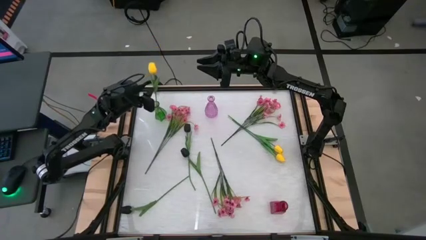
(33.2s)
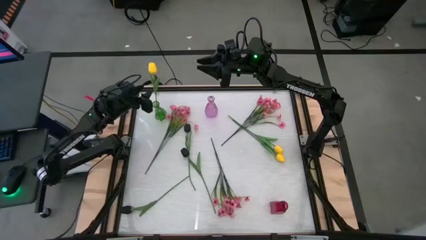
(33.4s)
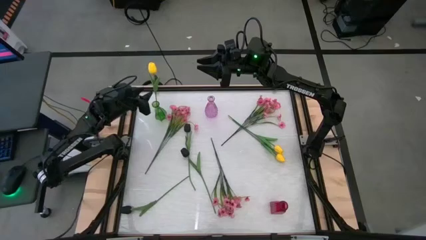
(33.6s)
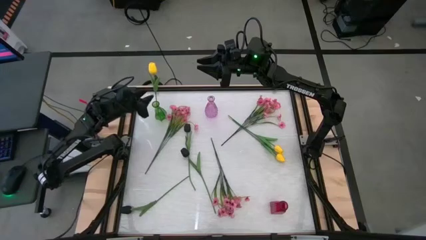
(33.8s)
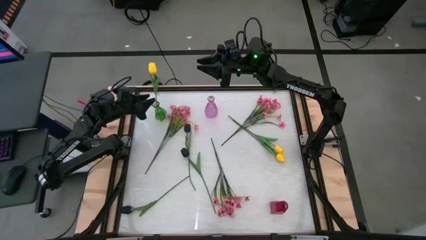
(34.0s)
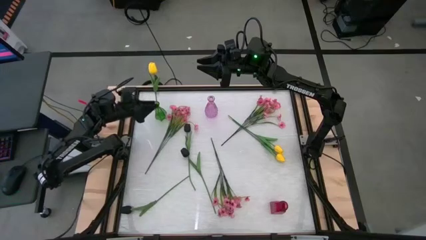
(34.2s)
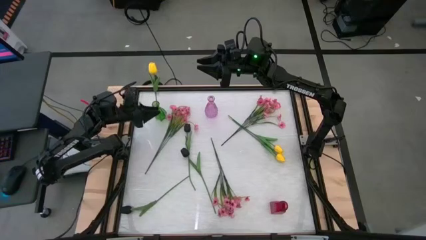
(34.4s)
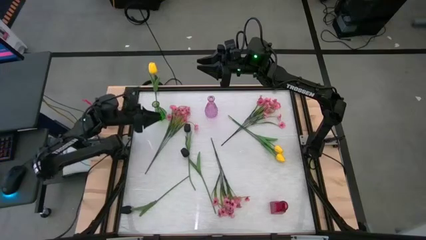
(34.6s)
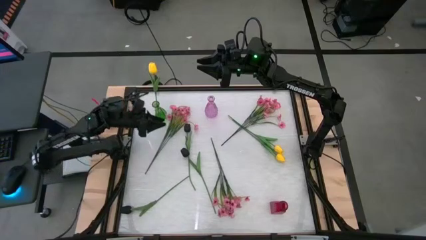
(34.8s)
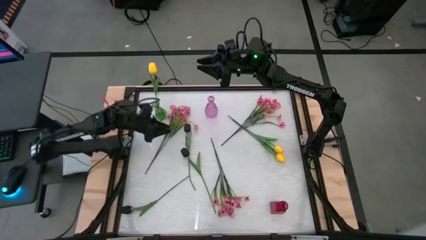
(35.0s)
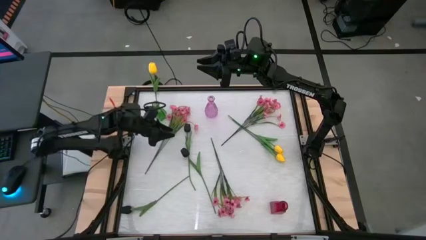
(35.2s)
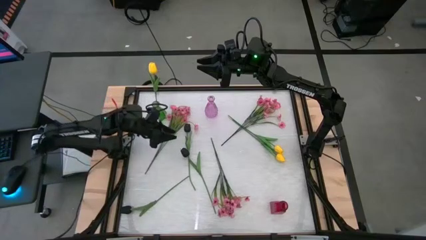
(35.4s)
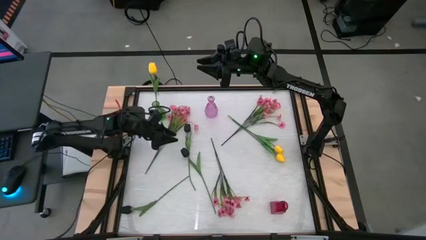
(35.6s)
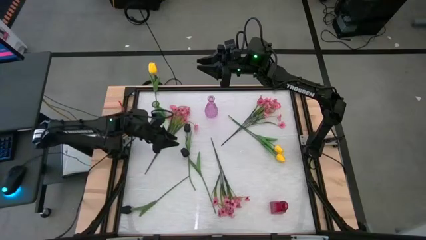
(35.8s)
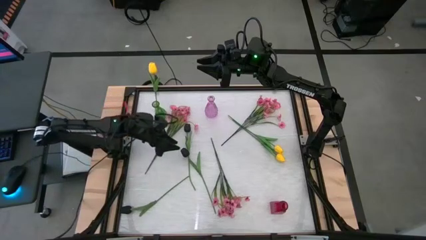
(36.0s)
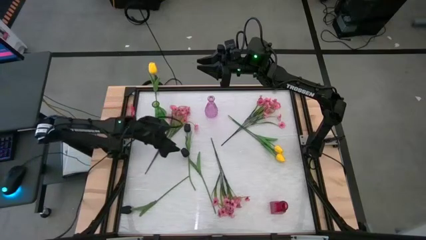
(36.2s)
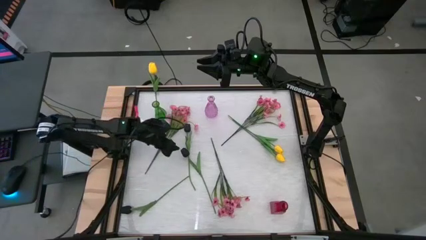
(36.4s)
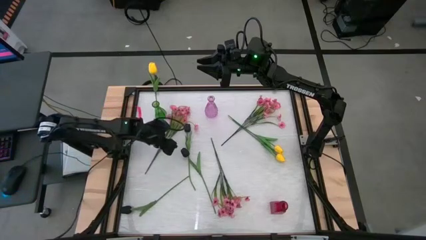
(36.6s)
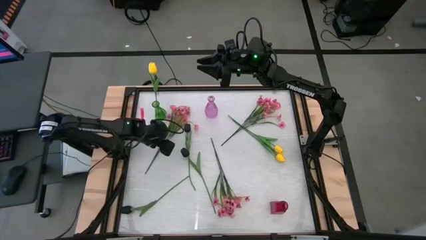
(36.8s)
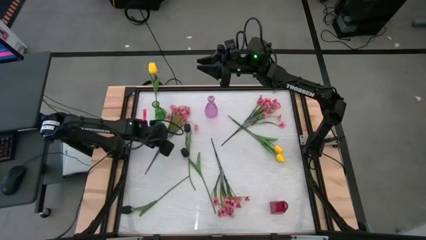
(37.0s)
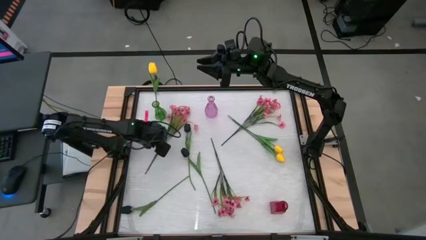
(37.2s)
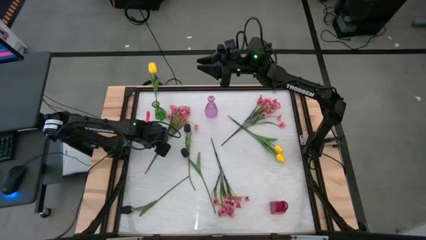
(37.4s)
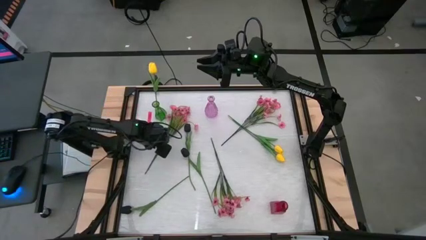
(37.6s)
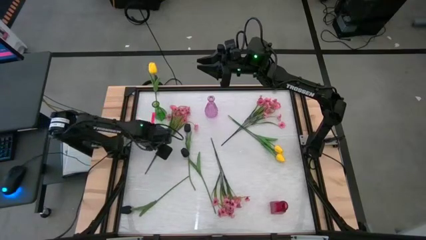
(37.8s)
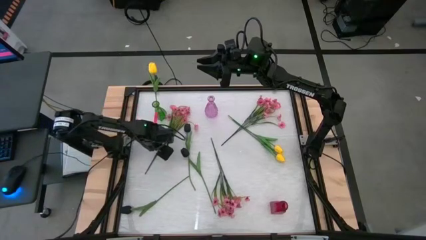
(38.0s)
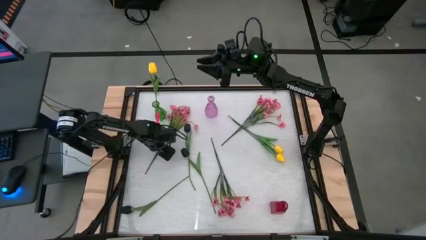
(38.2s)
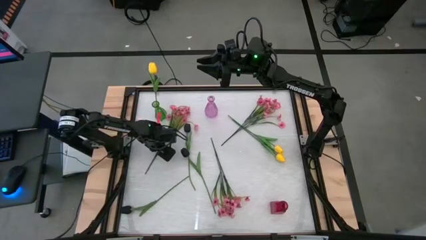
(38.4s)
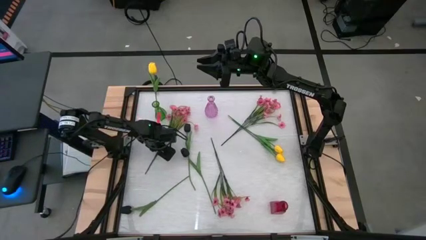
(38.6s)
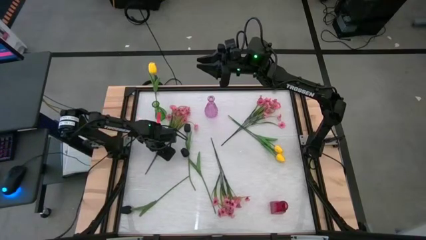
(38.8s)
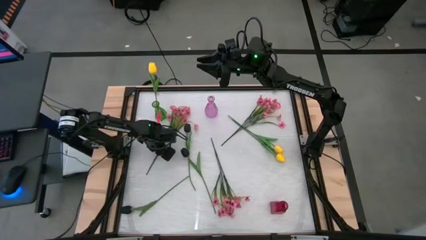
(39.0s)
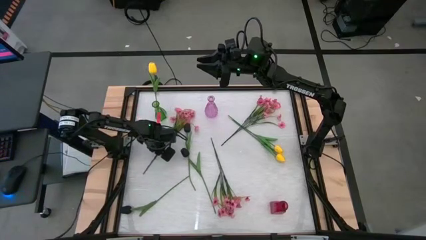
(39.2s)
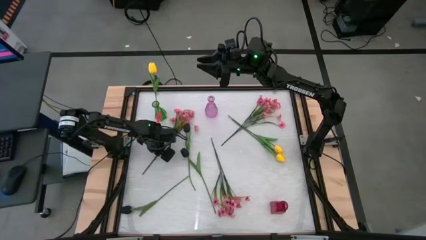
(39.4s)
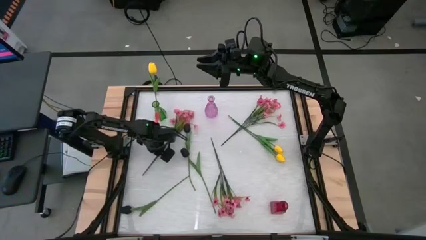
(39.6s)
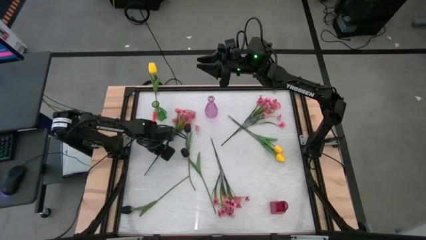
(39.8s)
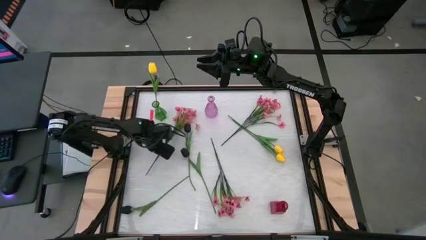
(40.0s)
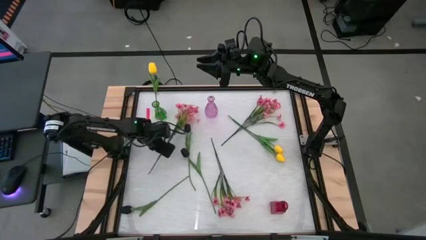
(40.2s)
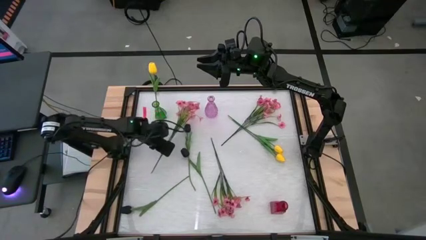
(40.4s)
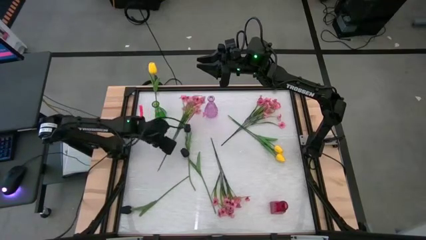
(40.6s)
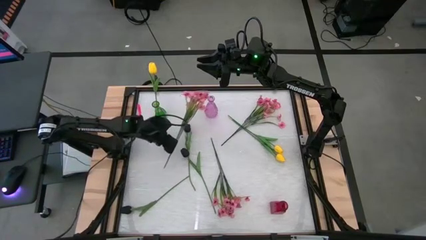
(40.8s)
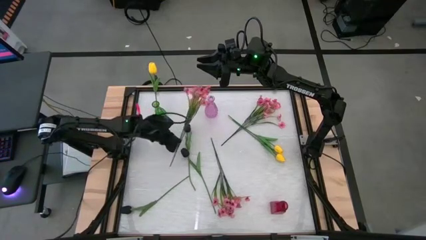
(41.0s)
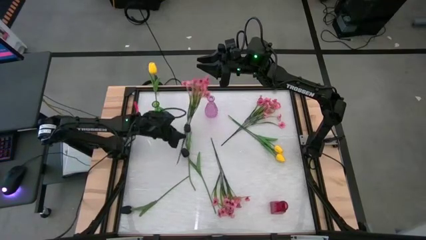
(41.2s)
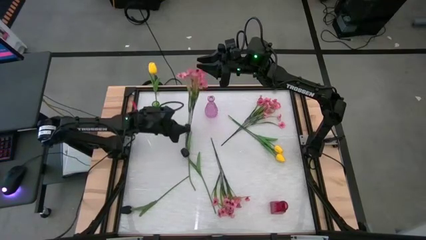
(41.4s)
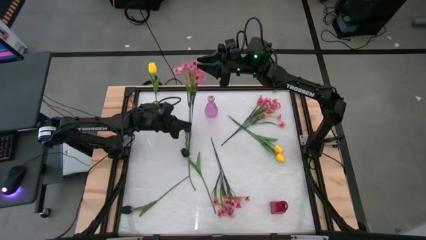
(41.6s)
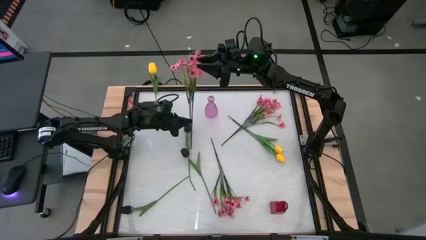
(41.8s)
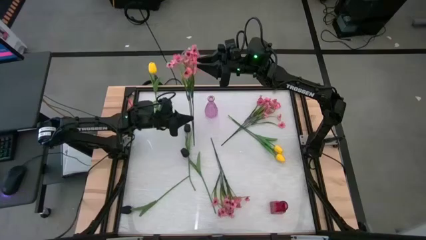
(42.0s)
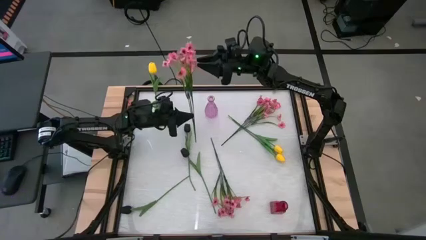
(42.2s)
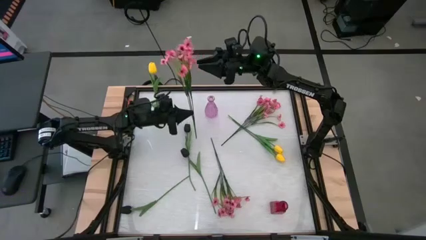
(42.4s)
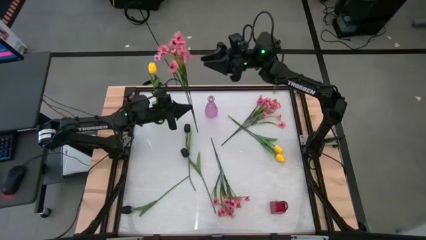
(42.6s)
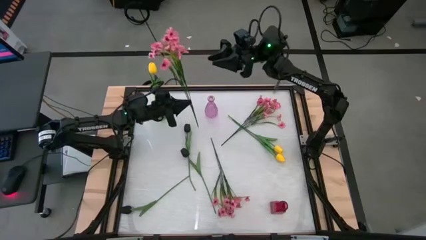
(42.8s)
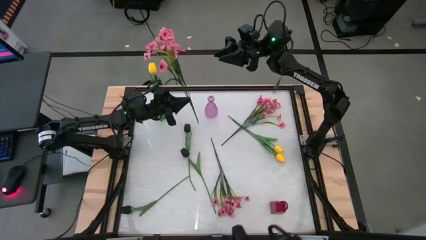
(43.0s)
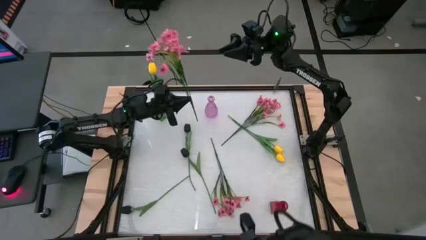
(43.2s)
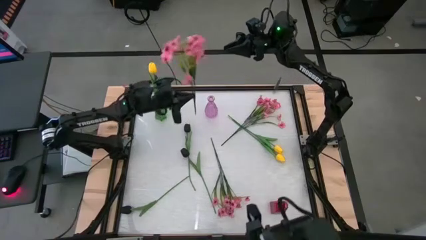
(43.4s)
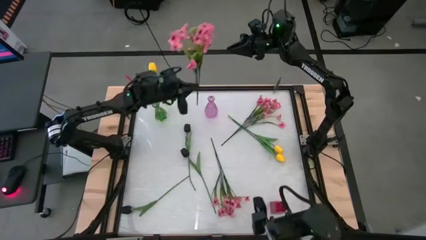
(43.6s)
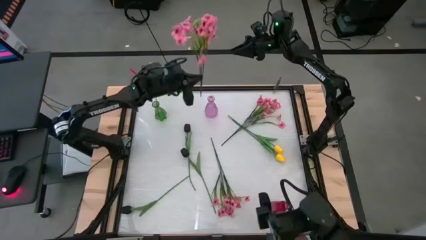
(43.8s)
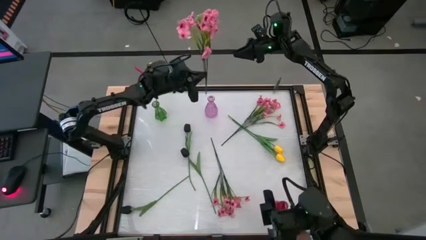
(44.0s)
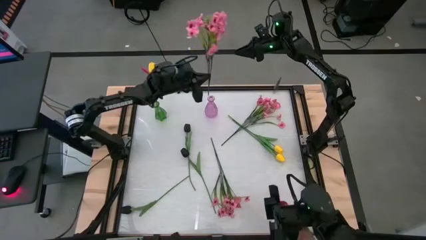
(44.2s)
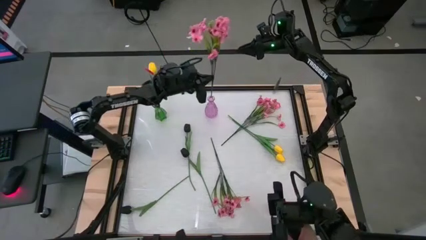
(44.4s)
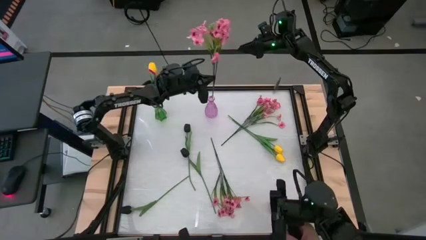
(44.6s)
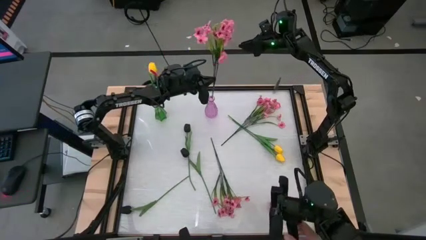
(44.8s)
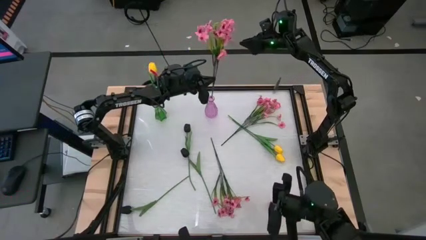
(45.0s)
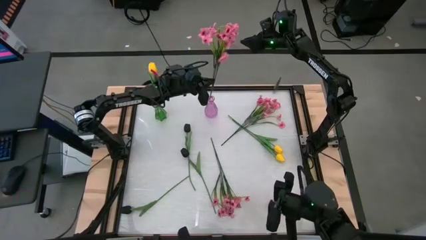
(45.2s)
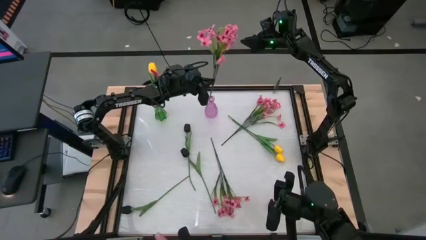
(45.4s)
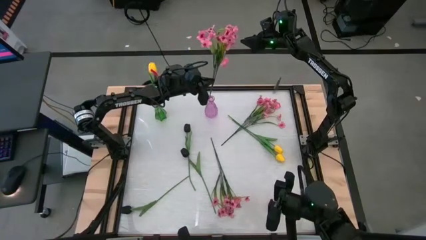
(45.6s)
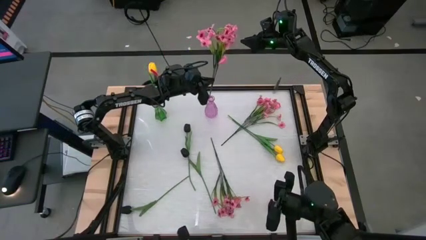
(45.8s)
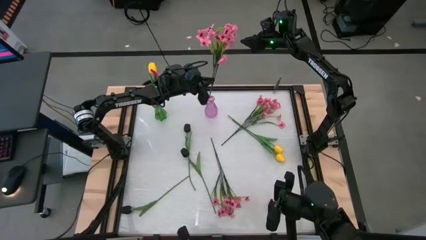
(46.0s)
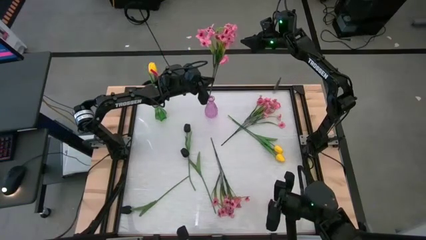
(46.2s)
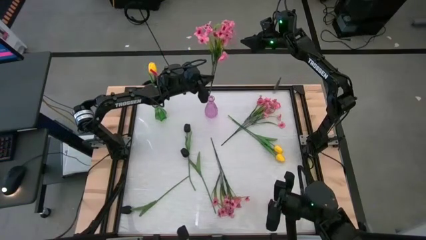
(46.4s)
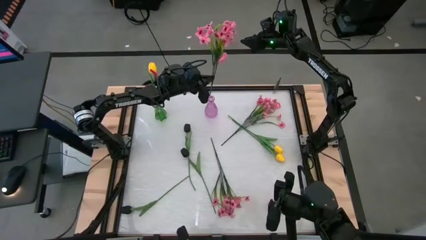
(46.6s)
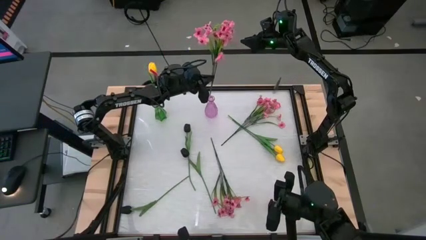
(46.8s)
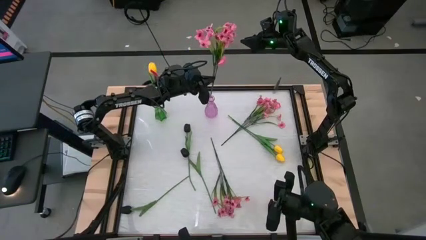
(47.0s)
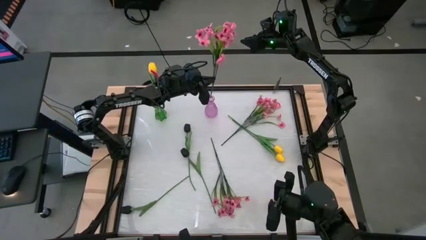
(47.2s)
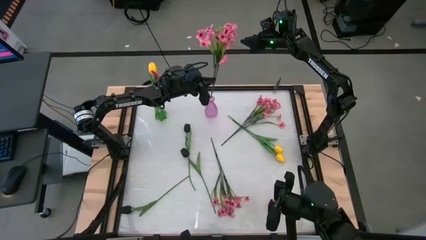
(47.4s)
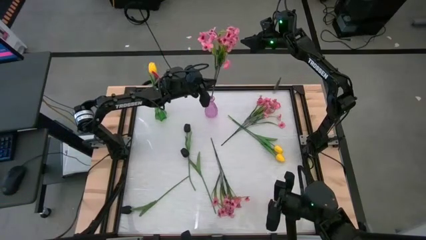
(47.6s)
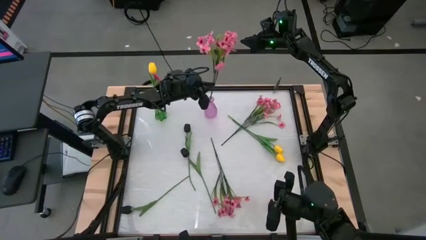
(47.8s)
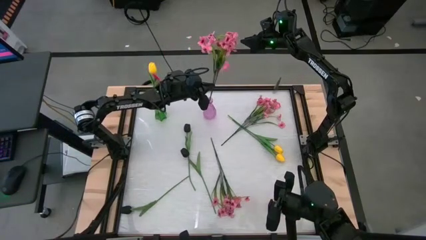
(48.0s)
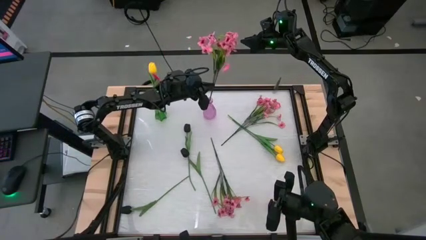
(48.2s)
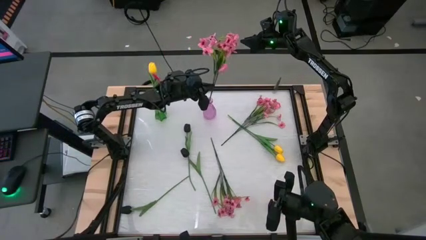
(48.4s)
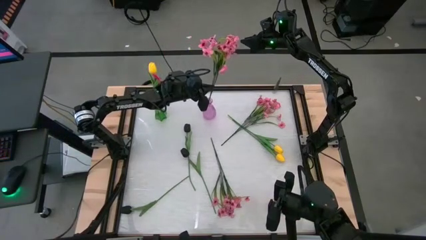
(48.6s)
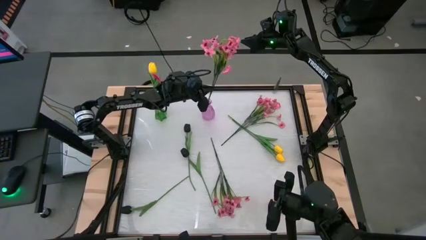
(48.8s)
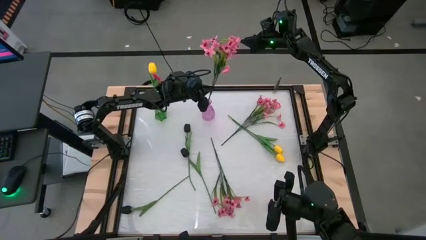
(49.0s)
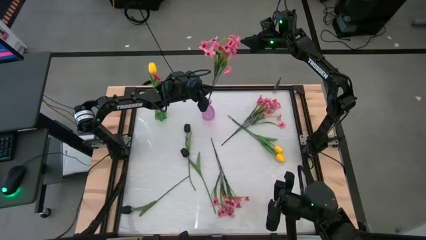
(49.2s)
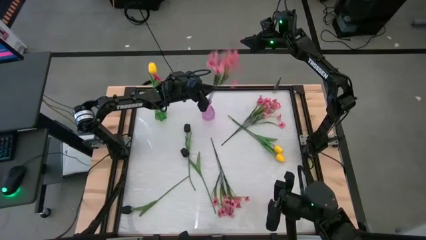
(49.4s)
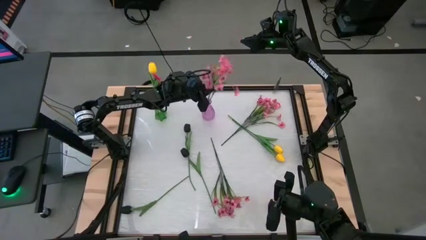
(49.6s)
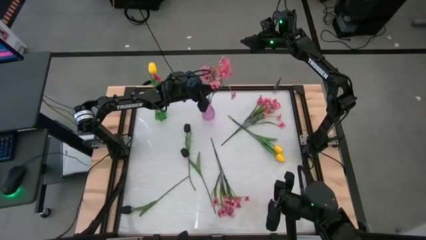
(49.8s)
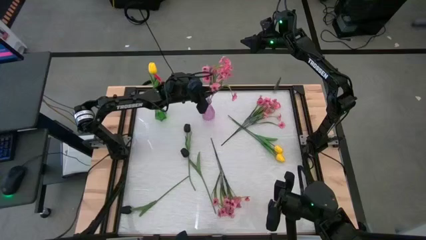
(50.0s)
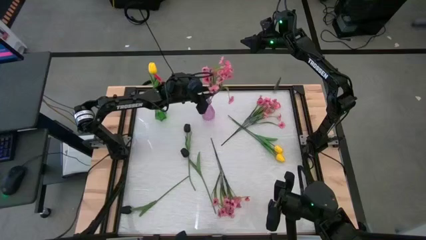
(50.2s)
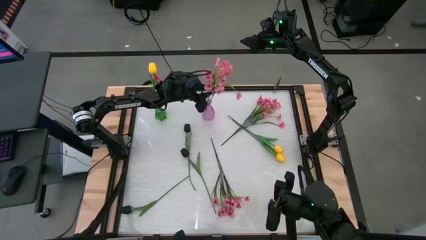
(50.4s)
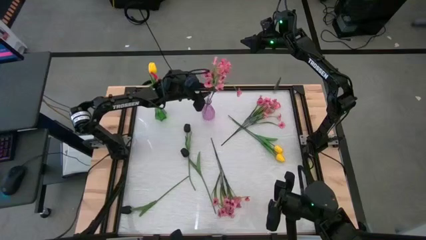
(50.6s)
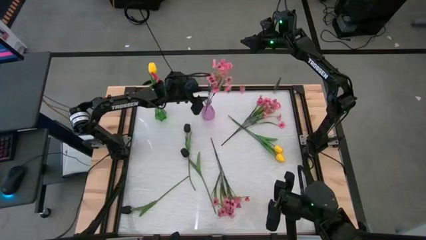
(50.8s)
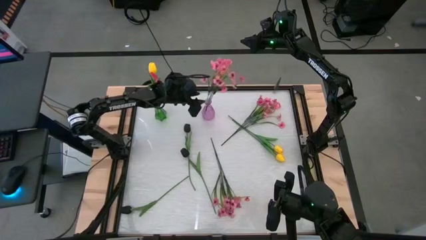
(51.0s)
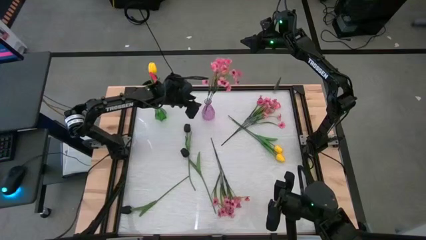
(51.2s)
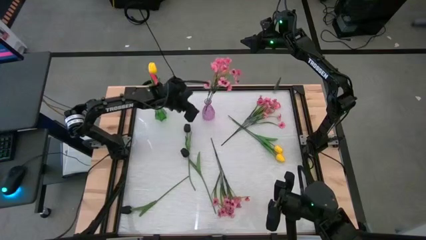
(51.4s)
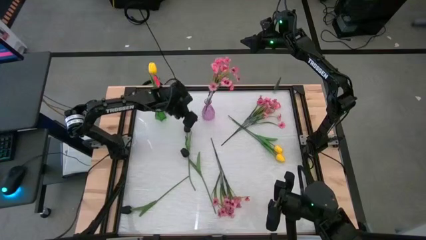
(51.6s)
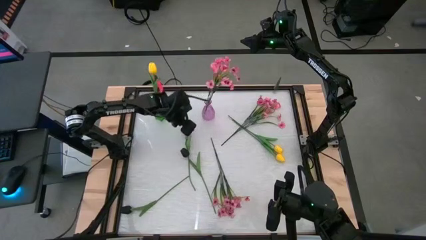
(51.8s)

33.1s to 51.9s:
Task: Sort flowers into vase by color
Put the top left pink flowers into the purple vase
